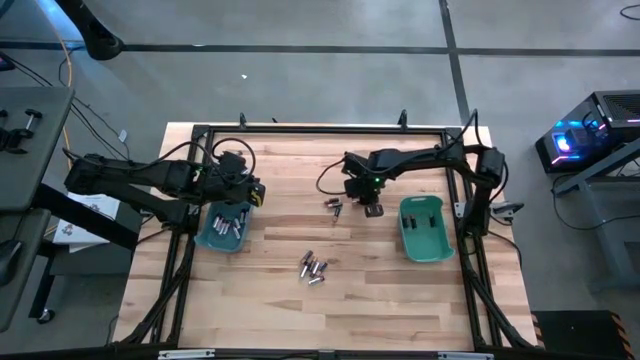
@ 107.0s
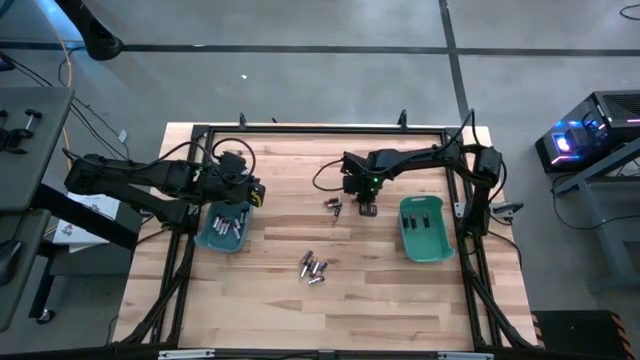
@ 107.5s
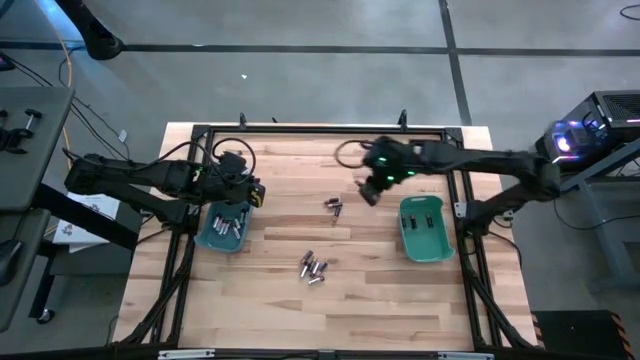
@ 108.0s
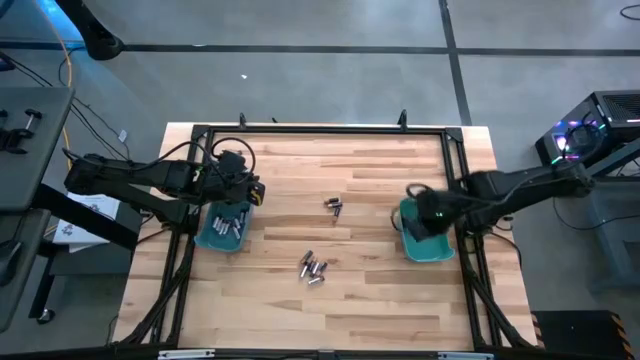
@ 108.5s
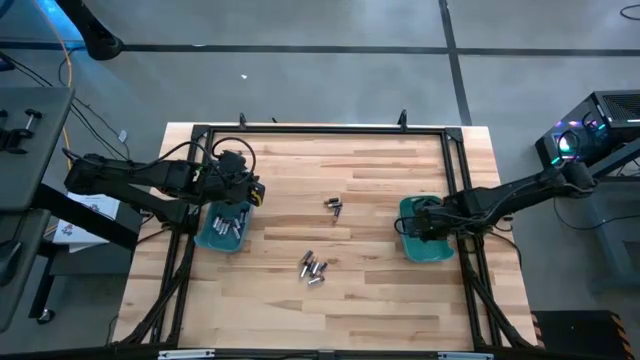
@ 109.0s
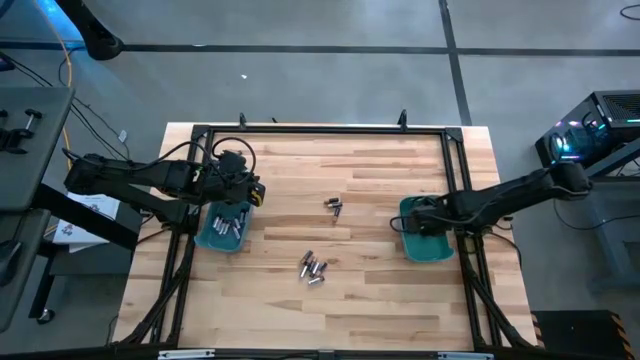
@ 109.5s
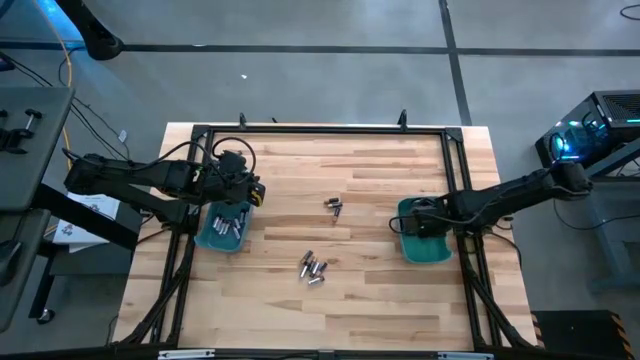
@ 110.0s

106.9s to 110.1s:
Task: Sort batteries
Put the black battery into the green bin

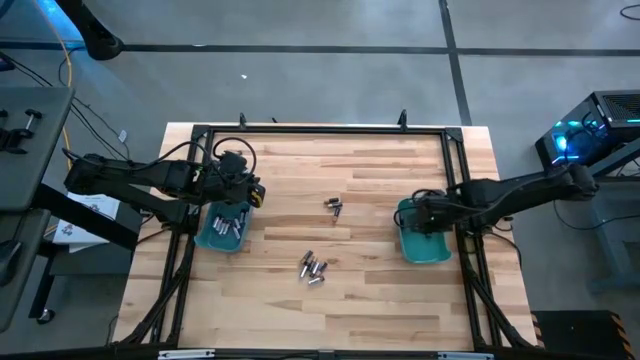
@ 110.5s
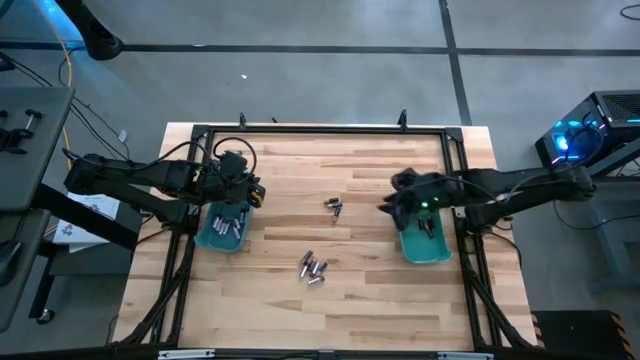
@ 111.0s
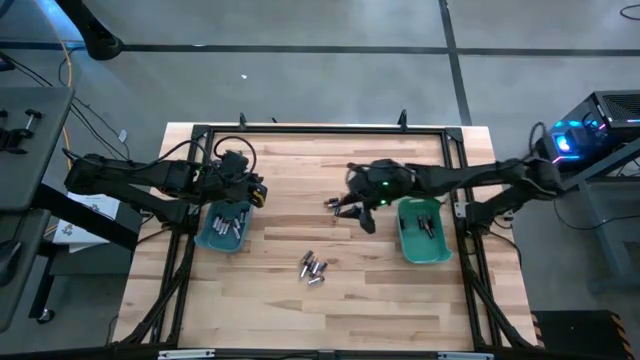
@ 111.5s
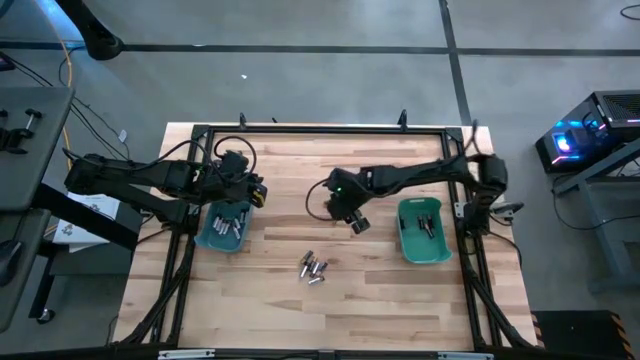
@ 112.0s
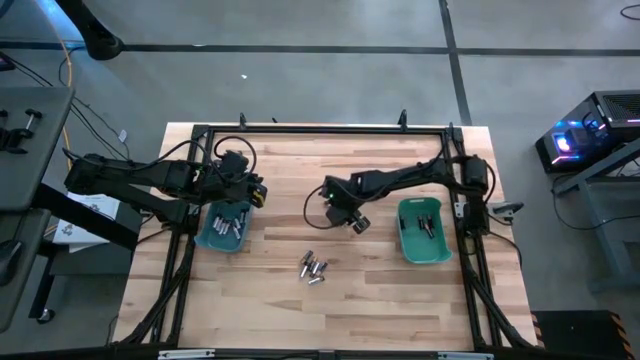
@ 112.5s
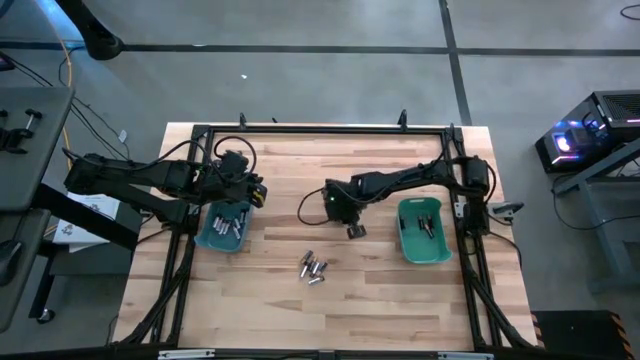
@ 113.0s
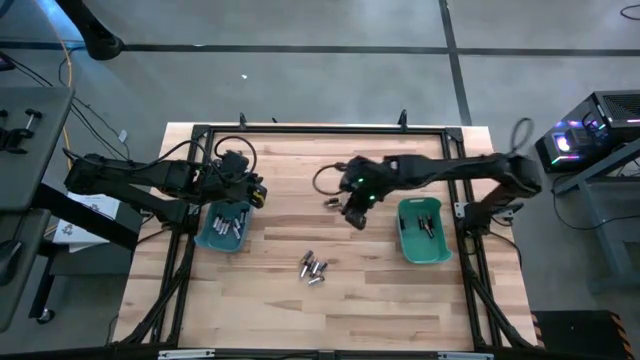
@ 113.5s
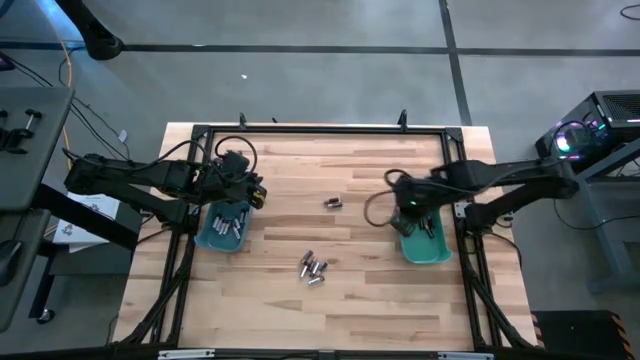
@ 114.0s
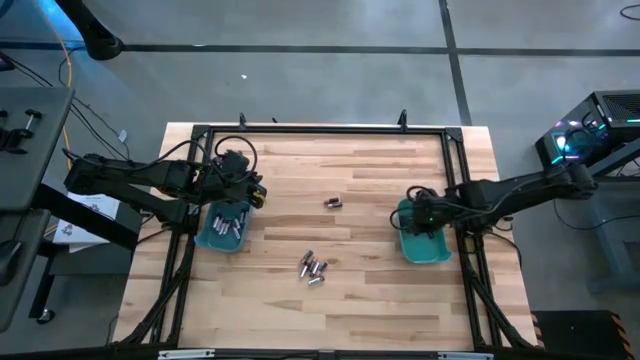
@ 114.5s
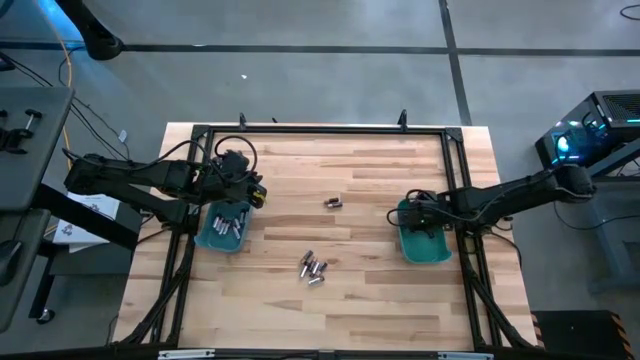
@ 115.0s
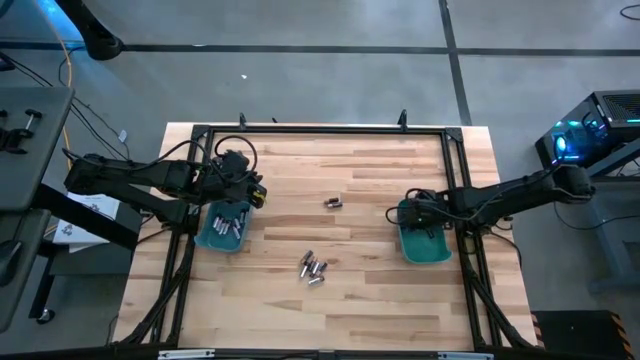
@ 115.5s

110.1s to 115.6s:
Put the black battery into the green bin

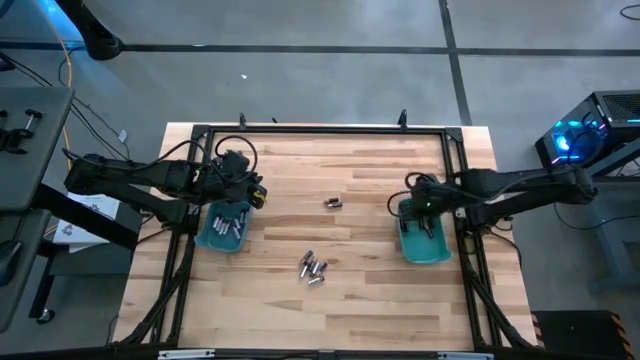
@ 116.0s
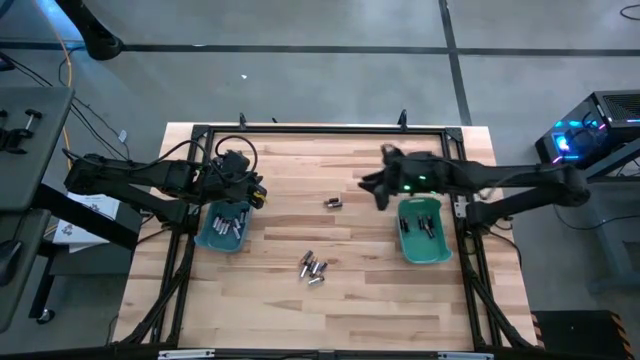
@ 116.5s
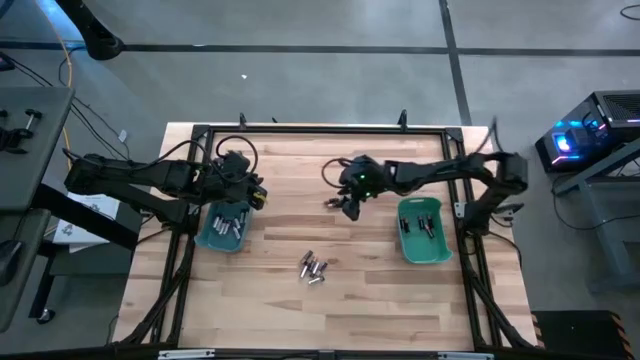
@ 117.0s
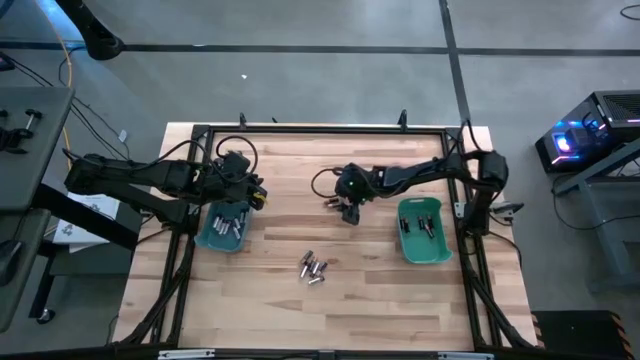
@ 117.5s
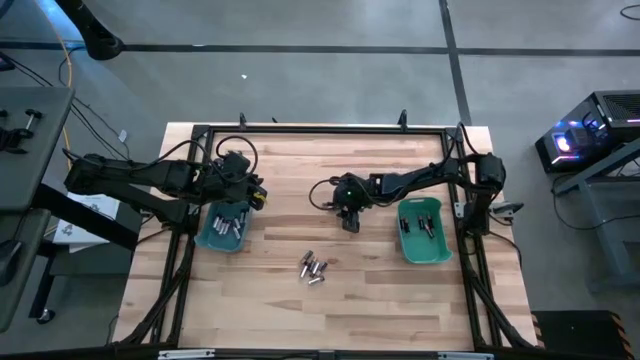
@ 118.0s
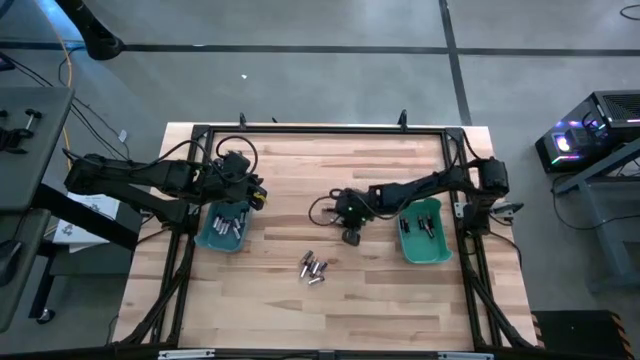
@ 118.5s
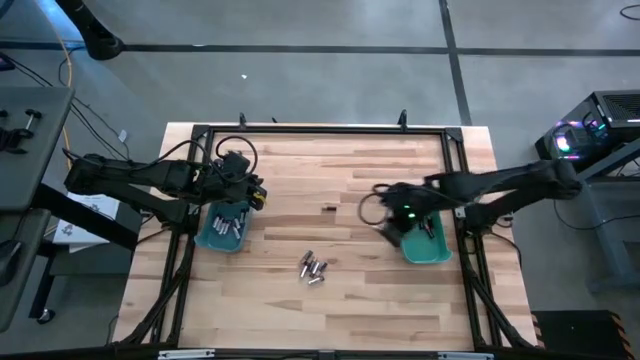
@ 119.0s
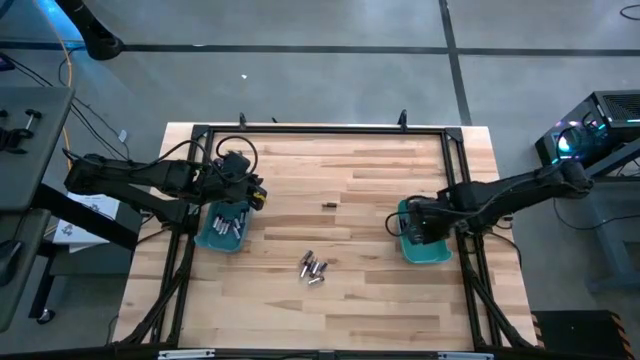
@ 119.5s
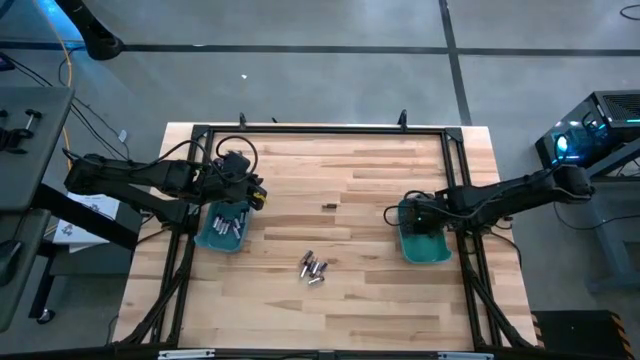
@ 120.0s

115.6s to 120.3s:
Put the black battery into the green bin

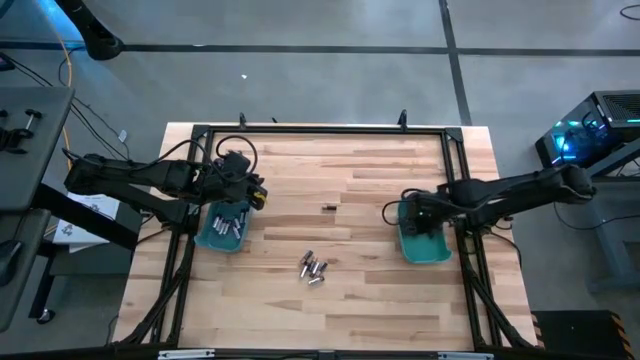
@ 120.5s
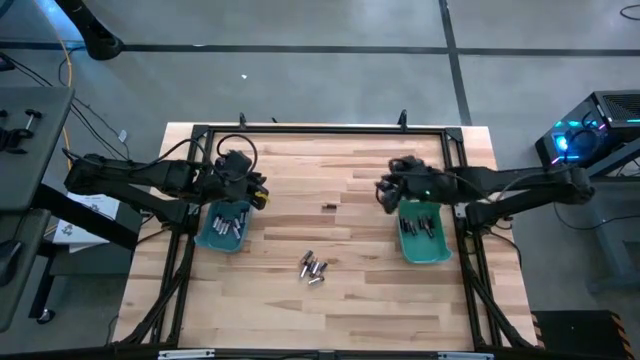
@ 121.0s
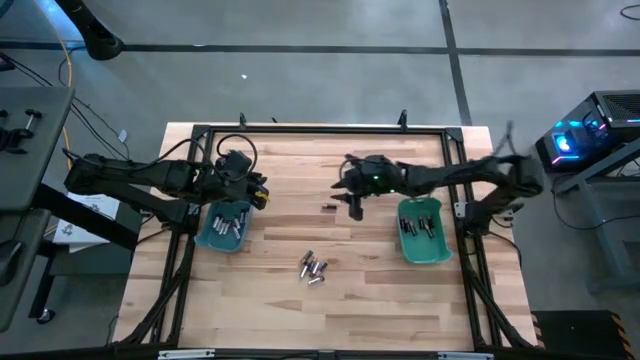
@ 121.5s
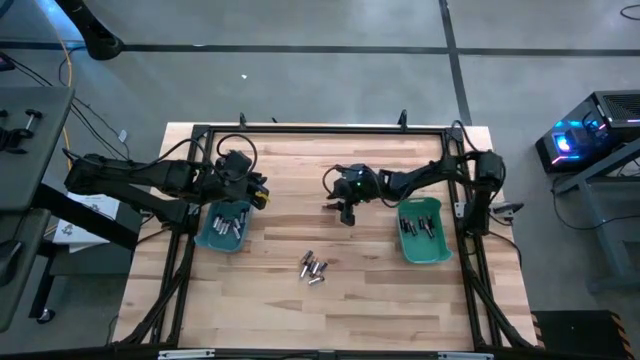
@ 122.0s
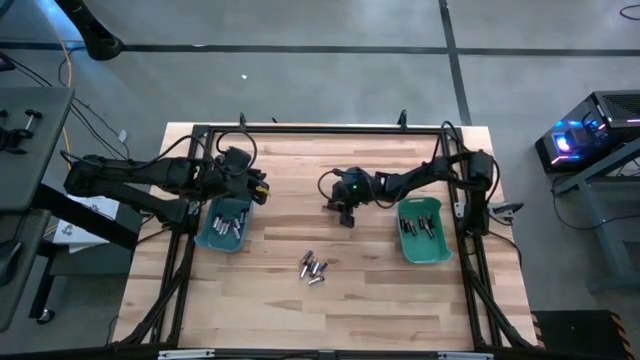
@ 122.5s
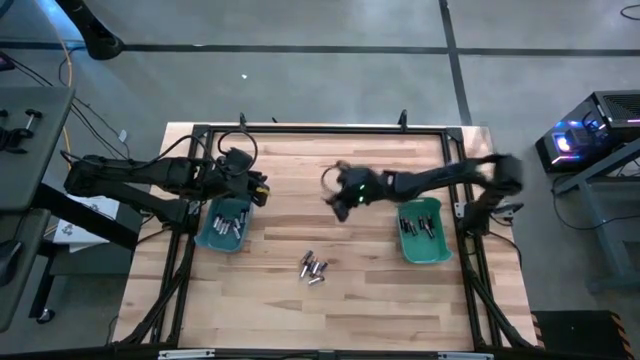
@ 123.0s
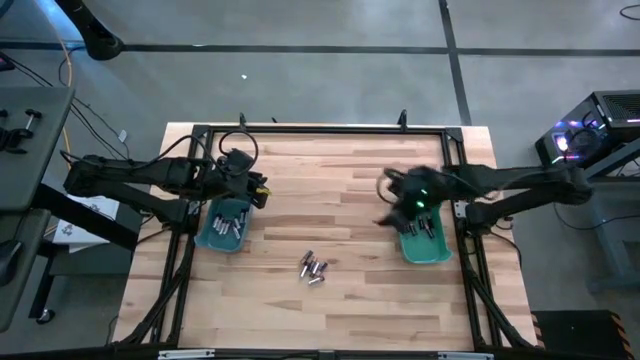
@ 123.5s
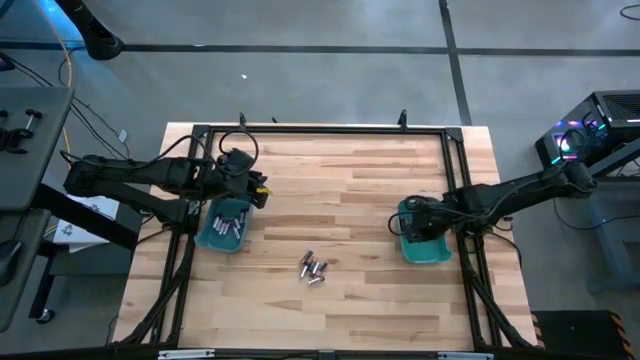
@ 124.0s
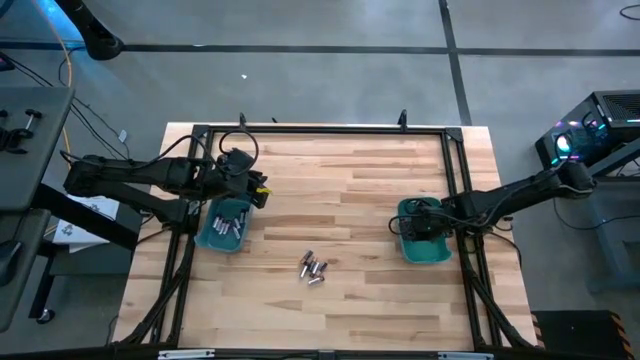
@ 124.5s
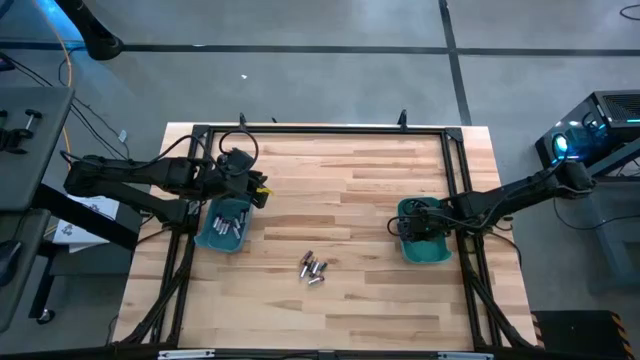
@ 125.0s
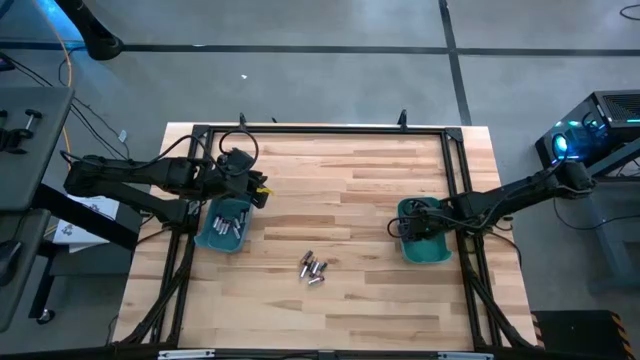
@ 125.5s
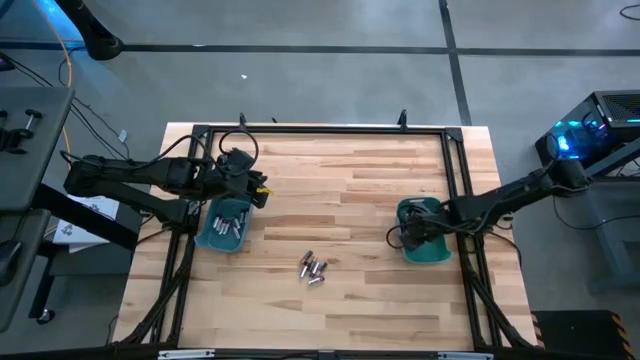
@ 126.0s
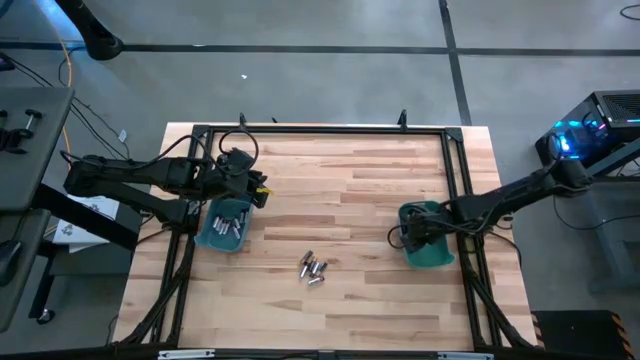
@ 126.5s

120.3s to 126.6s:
Put the black battery into the green bin

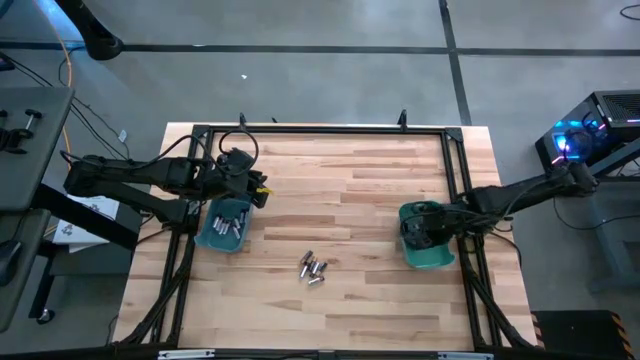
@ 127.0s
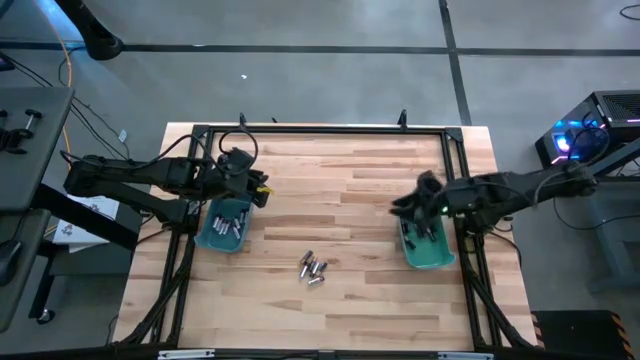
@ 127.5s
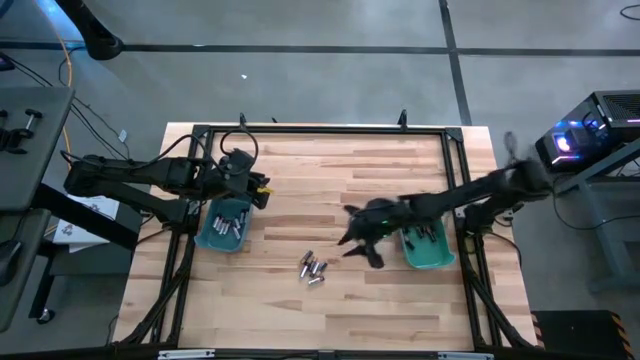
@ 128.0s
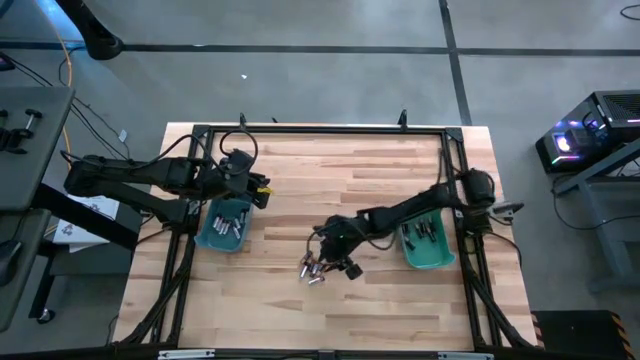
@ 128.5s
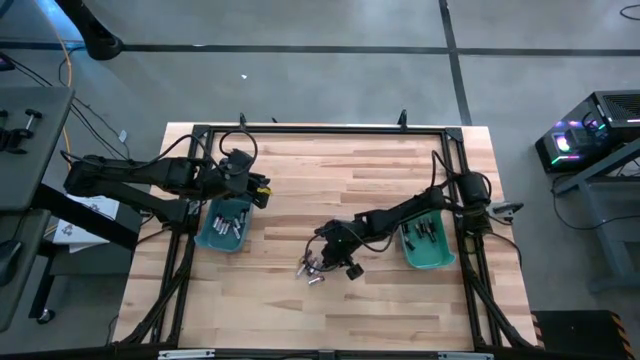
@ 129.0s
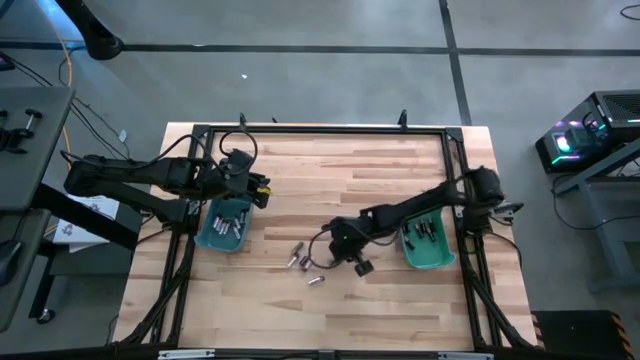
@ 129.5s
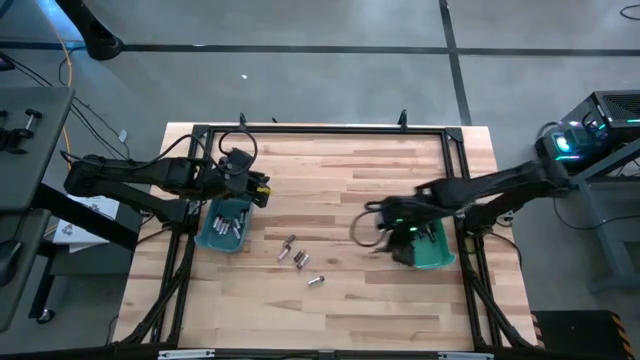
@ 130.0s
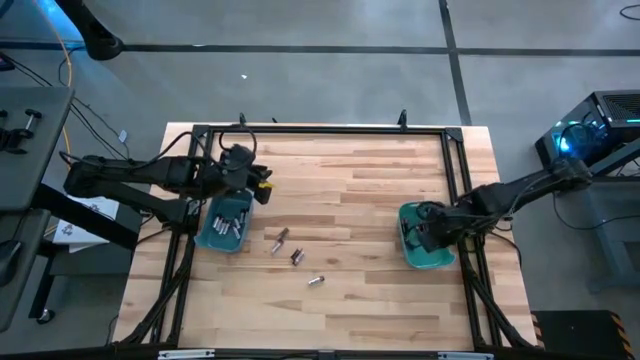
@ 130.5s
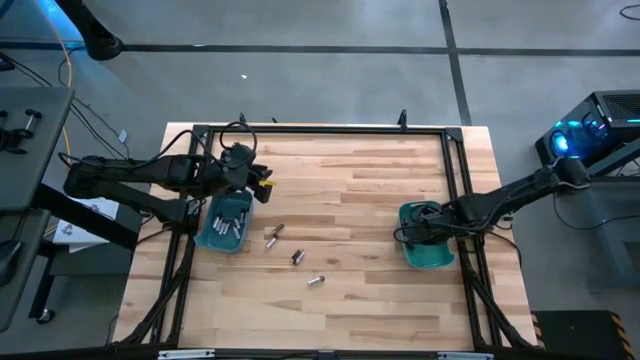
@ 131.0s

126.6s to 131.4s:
Put the black battery into the green bin
